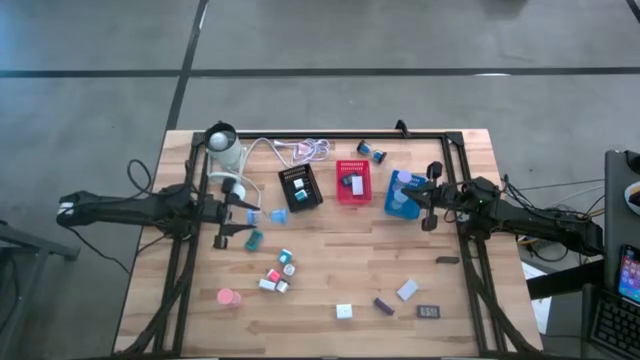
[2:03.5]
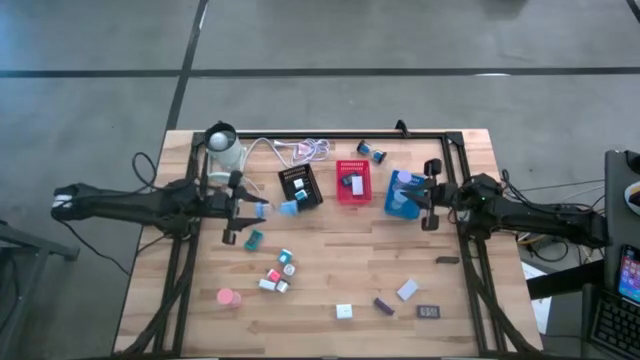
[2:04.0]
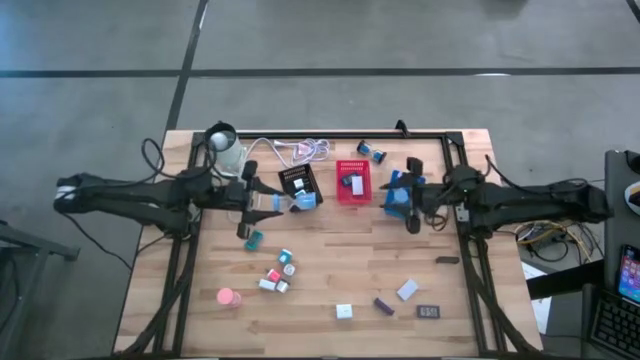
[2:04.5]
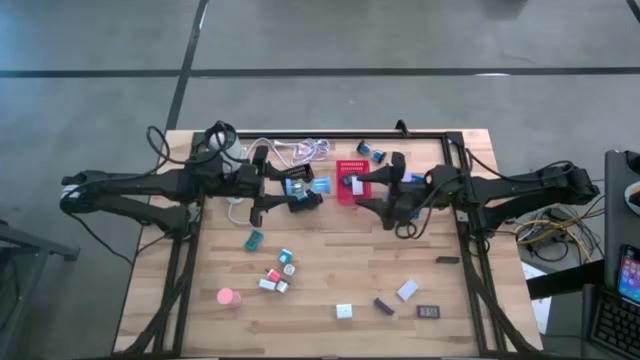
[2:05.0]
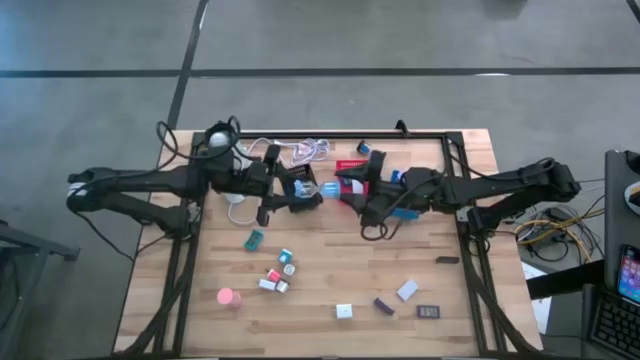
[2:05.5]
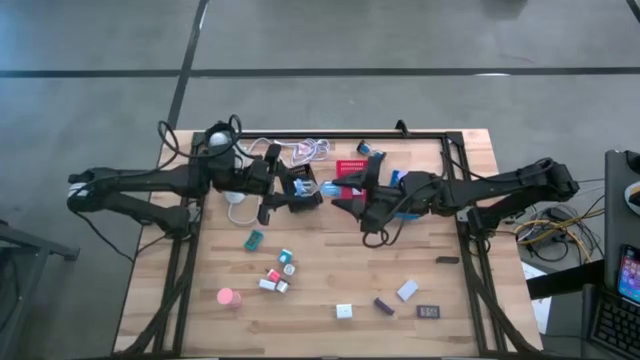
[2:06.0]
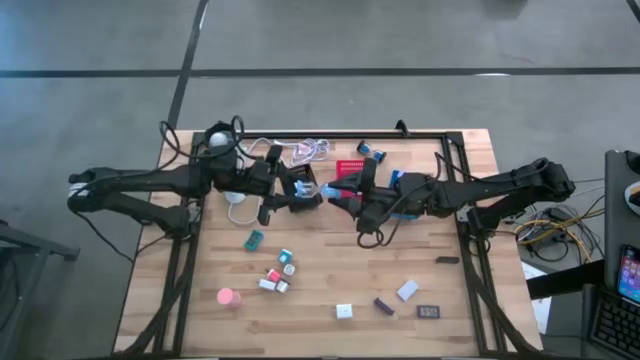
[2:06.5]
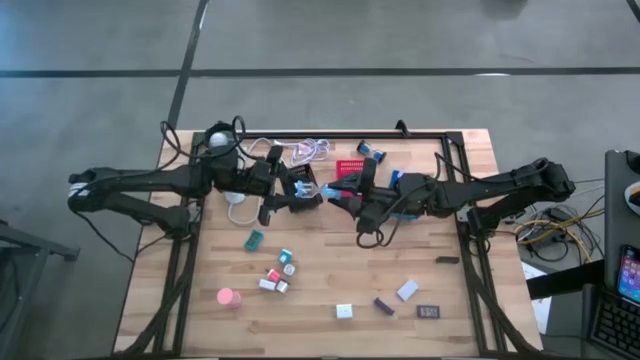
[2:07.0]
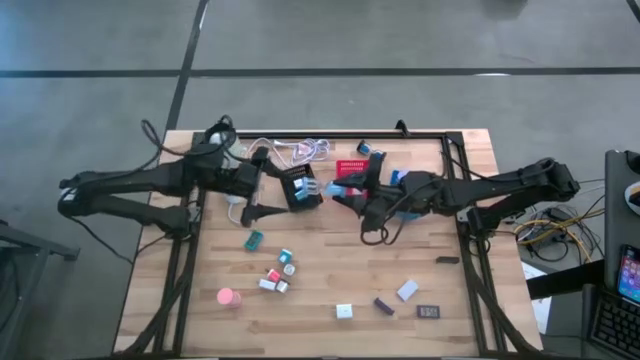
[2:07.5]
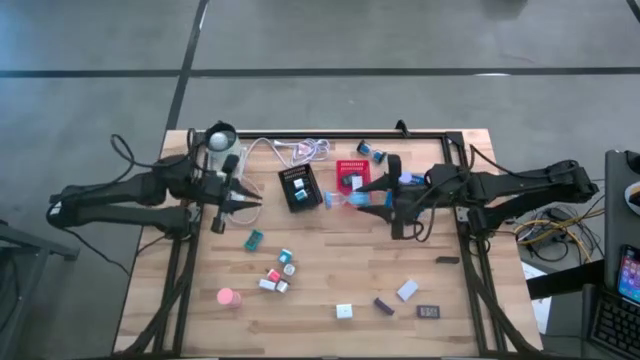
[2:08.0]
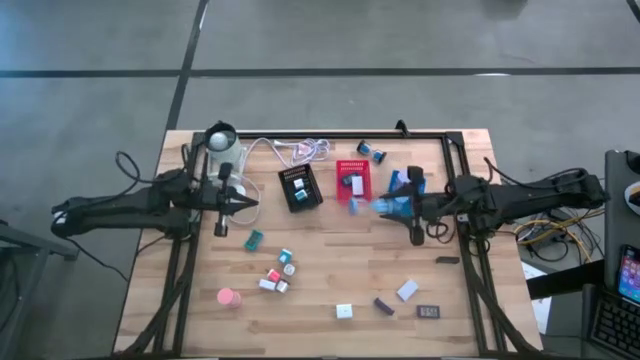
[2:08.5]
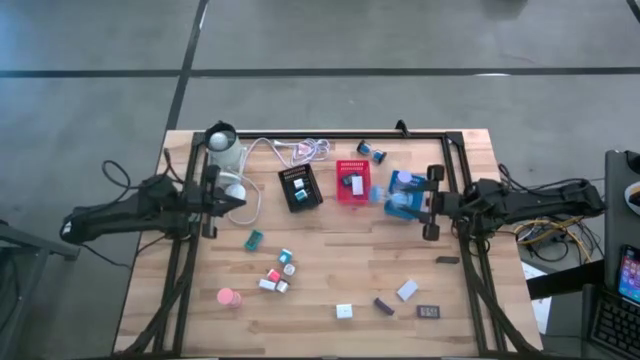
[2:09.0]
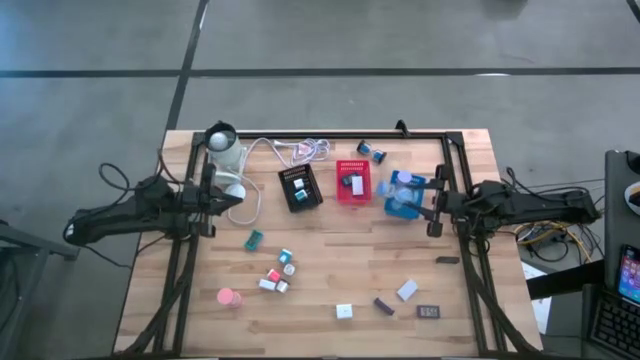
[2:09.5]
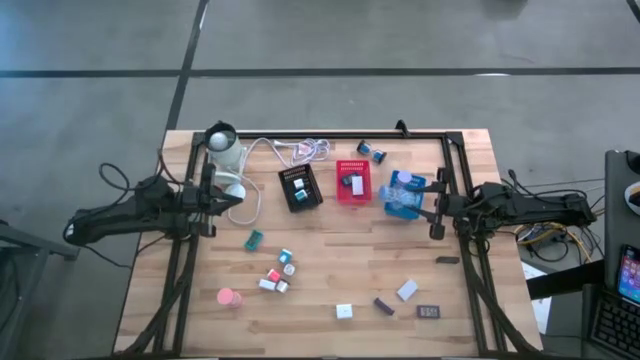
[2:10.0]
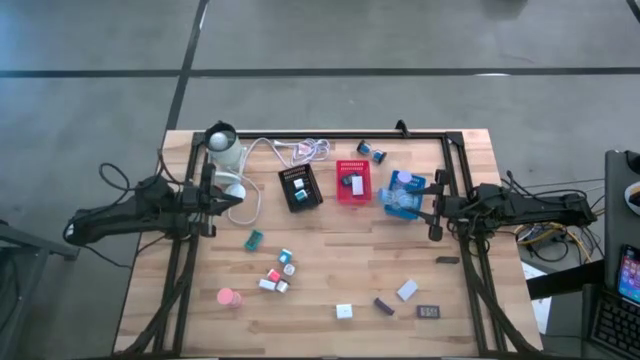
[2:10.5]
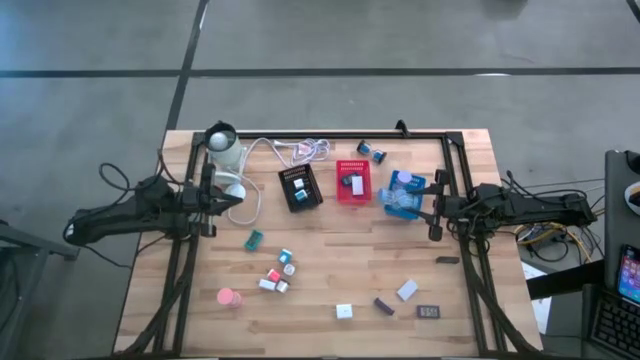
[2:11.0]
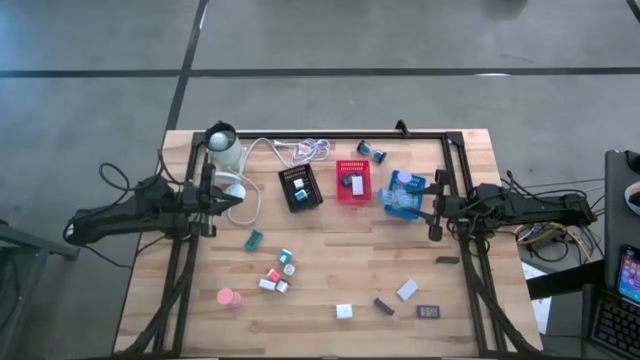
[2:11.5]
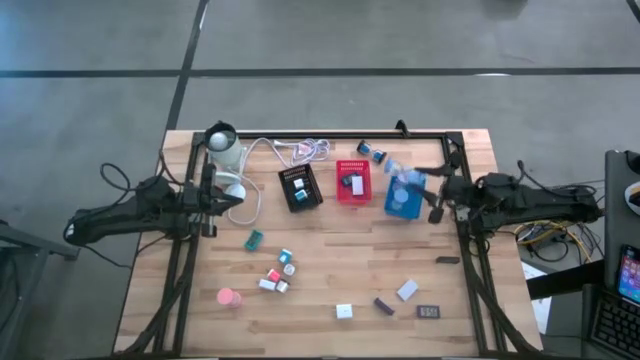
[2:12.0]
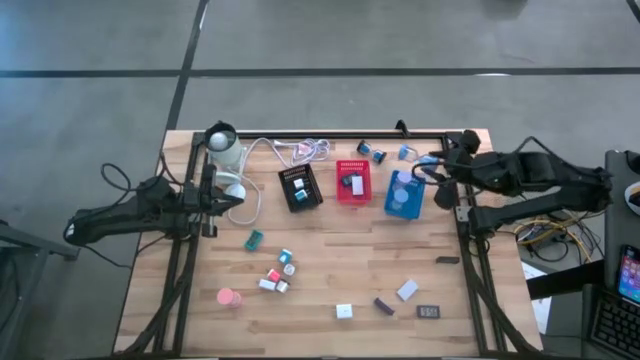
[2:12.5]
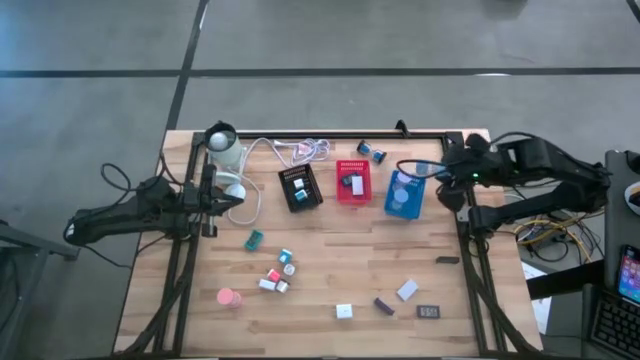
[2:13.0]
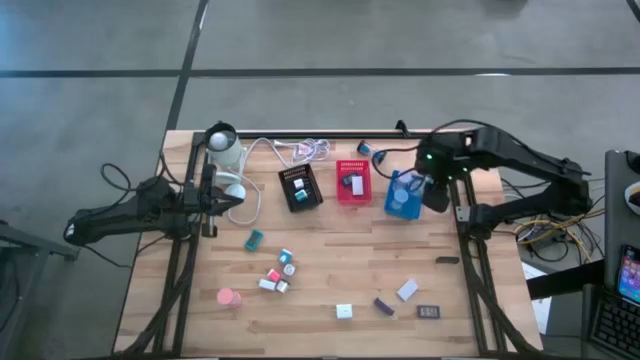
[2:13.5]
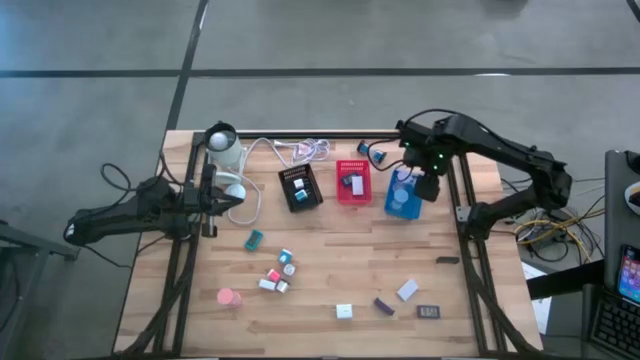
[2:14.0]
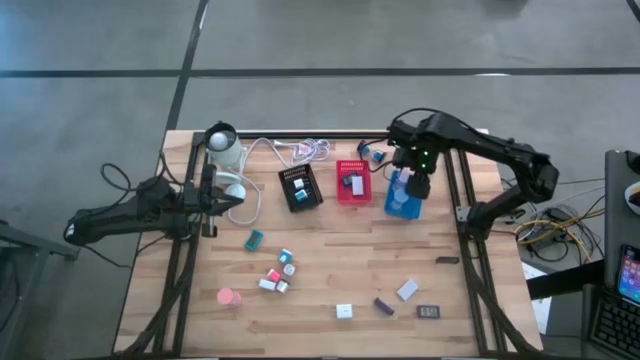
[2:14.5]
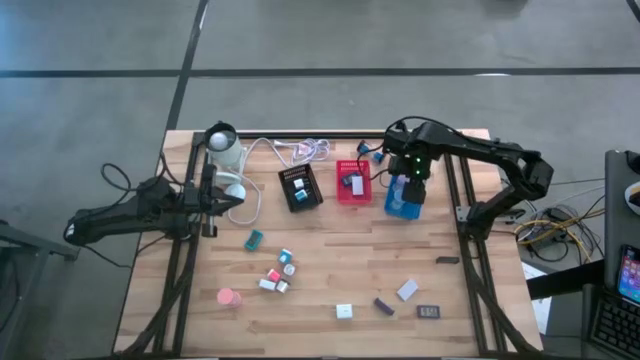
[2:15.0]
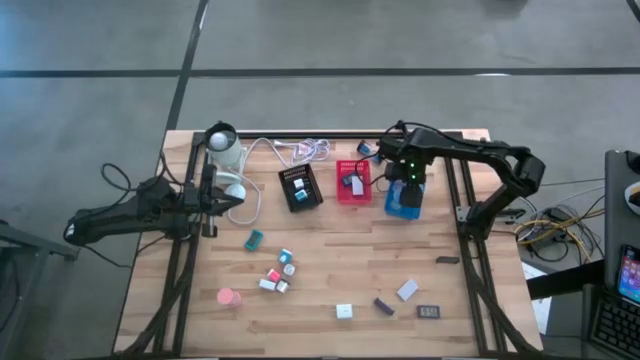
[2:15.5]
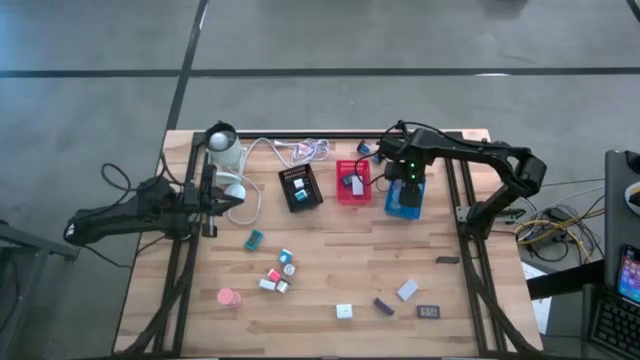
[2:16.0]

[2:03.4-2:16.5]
Task: Pick & Place Office items
Put the light blue hourglass into the blue bin

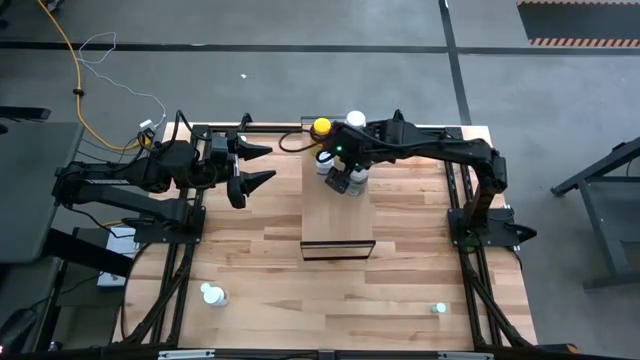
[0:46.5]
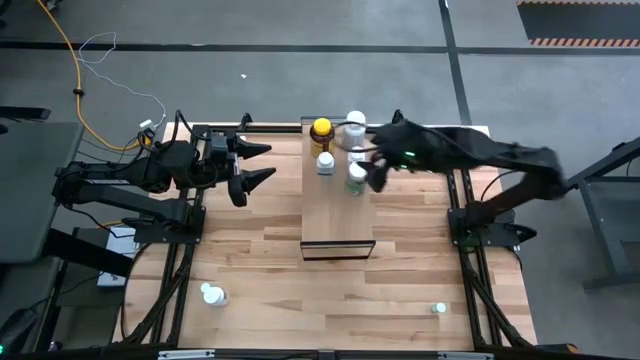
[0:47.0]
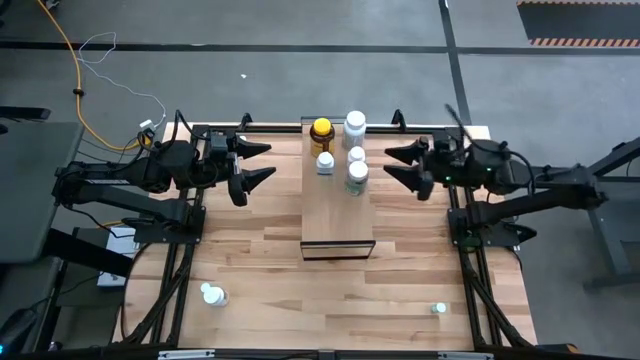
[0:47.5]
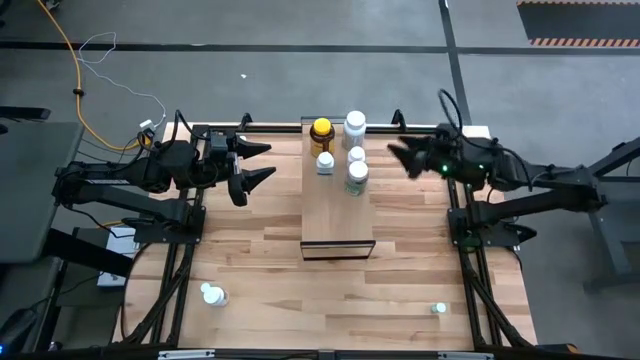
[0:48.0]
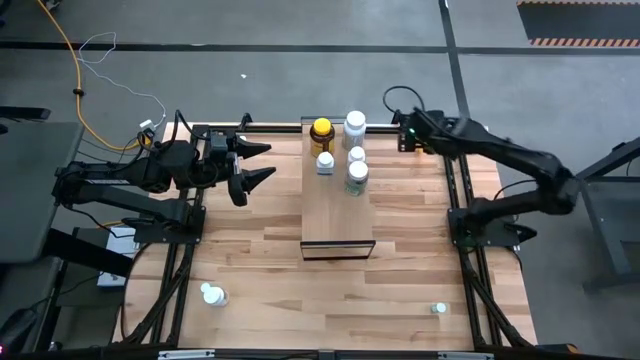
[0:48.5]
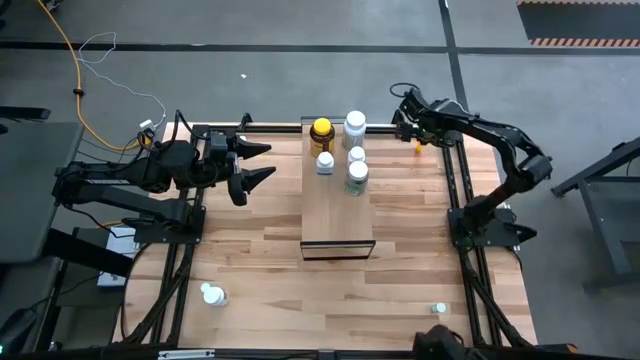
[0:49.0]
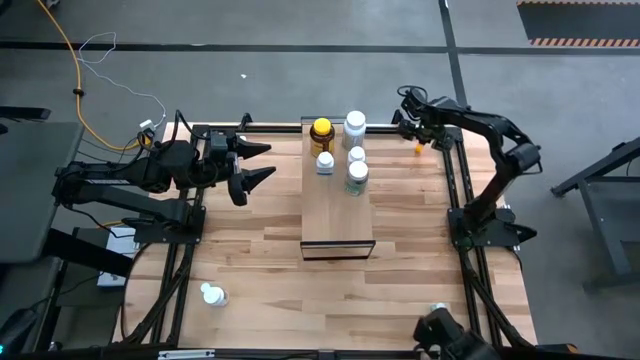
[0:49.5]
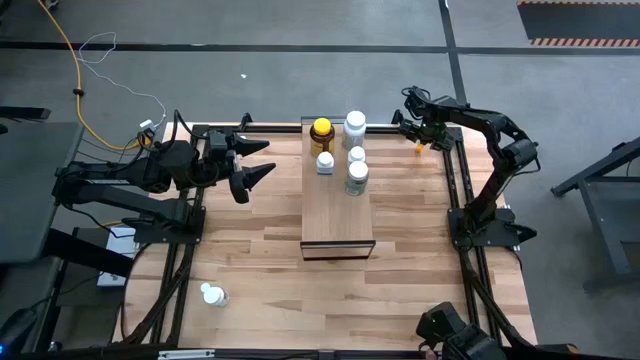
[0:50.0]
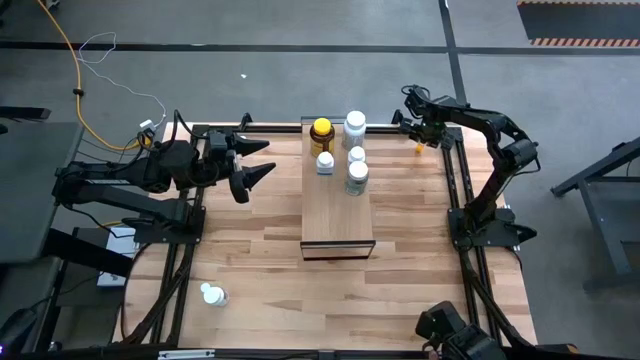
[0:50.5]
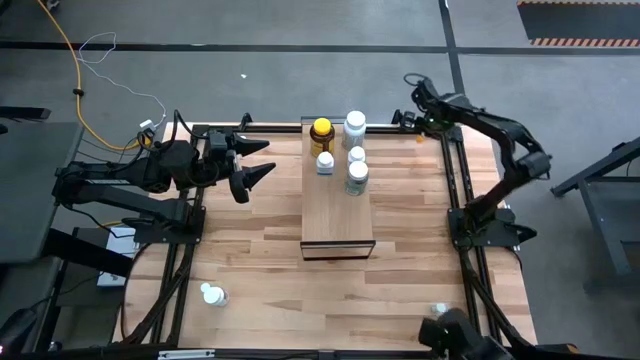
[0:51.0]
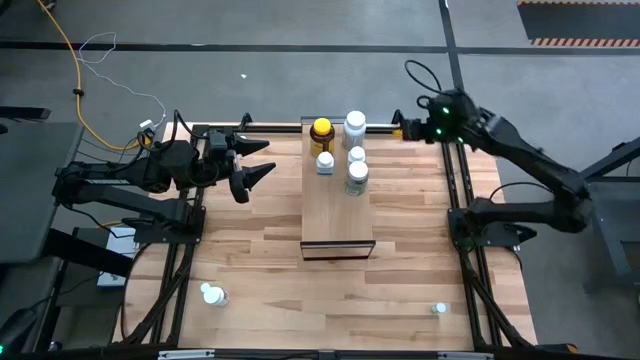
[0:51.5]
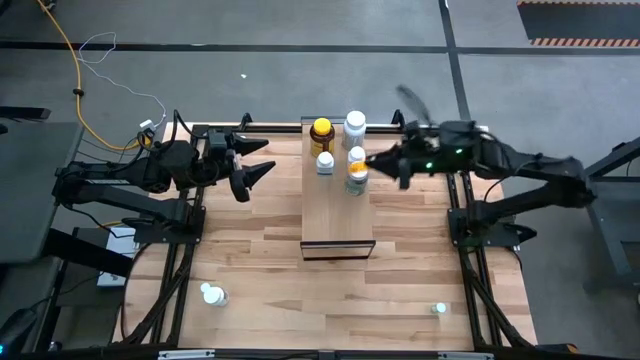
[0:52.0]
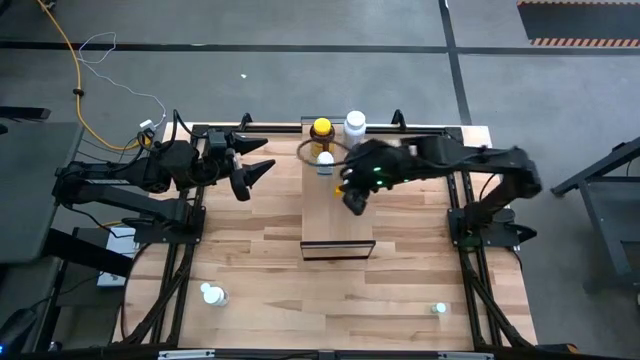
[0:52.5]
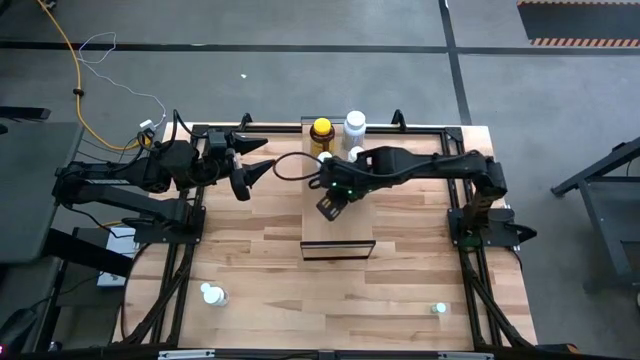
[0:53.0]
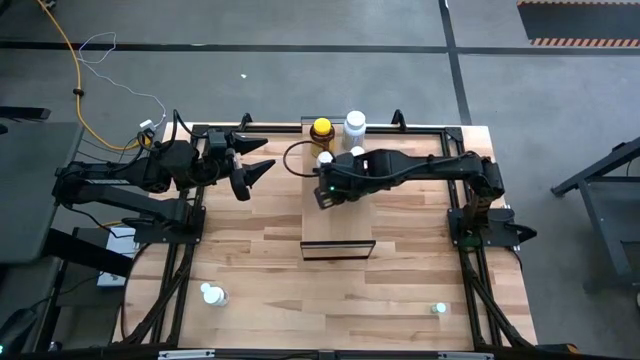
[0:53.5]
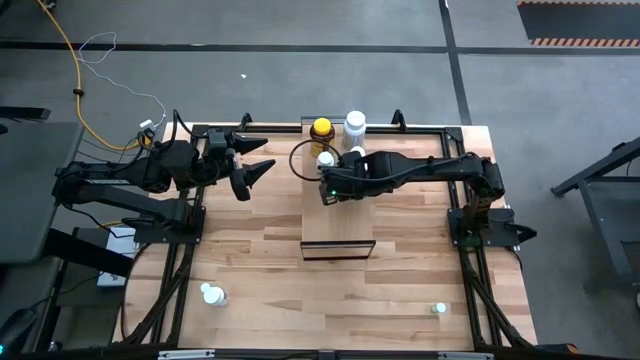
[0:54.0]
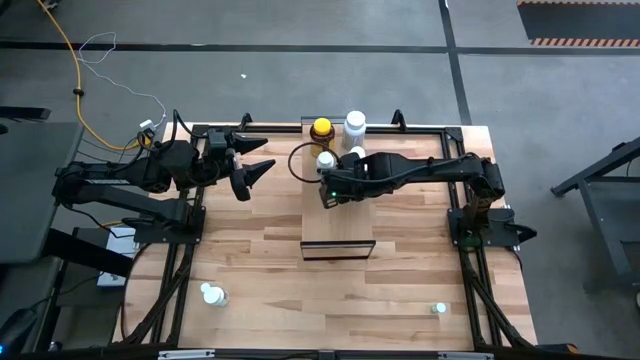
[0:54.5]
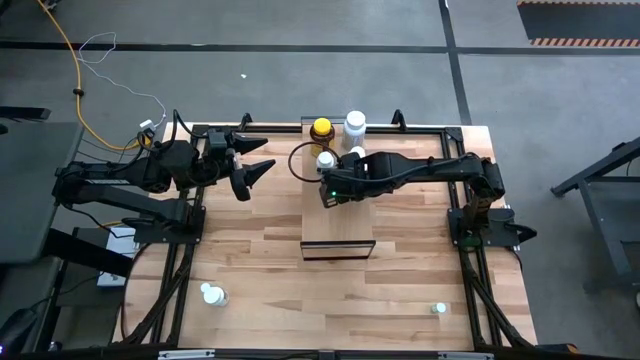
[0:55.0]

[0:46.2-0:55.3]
Task: Pick and place medicine bottles onto shelf by color
Put the orange pill bottle on the shelf
